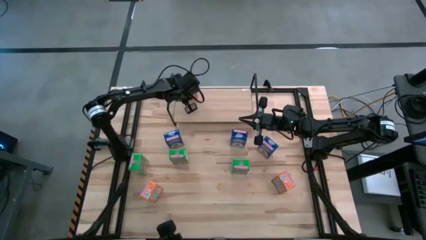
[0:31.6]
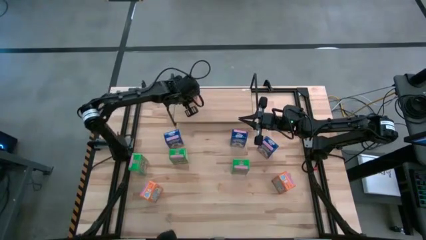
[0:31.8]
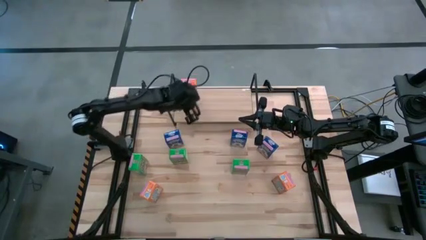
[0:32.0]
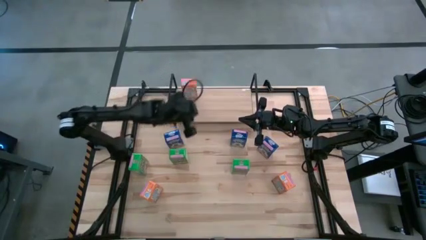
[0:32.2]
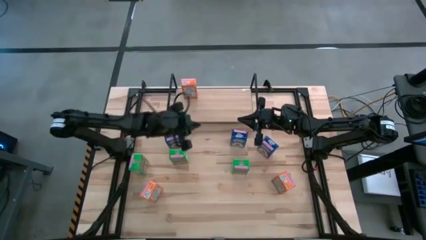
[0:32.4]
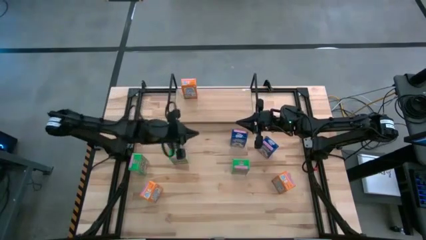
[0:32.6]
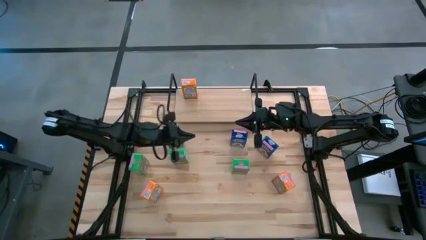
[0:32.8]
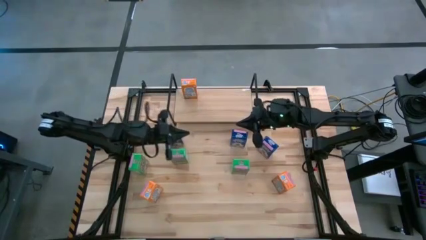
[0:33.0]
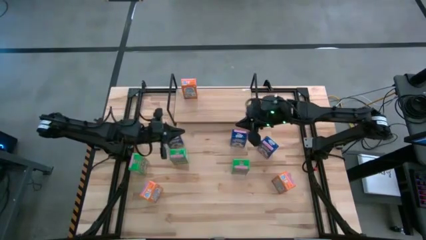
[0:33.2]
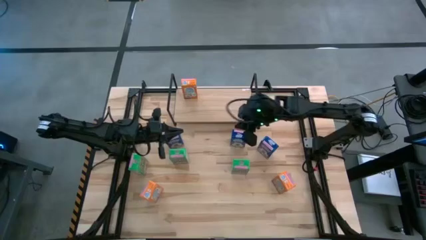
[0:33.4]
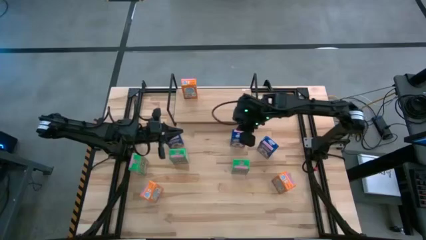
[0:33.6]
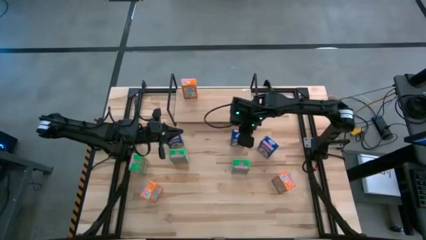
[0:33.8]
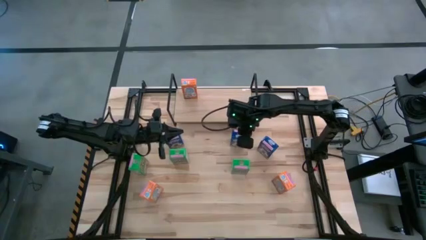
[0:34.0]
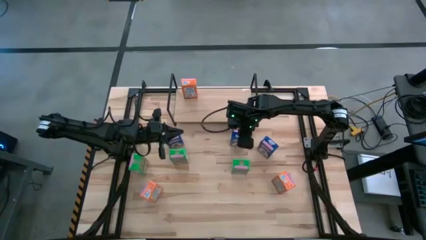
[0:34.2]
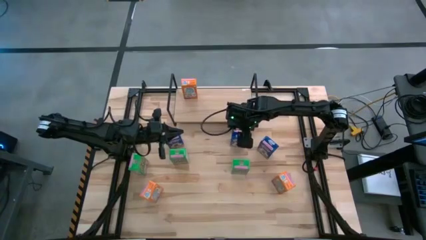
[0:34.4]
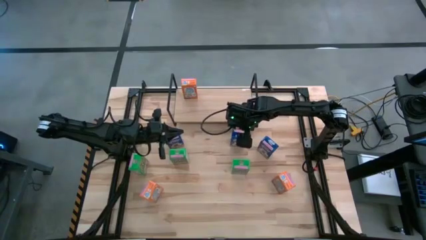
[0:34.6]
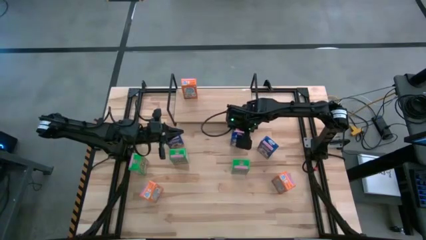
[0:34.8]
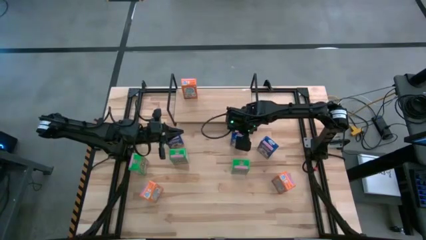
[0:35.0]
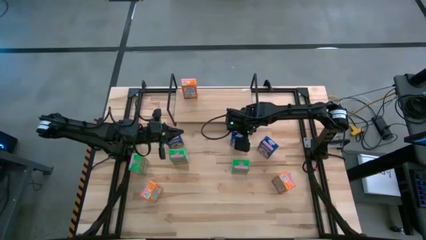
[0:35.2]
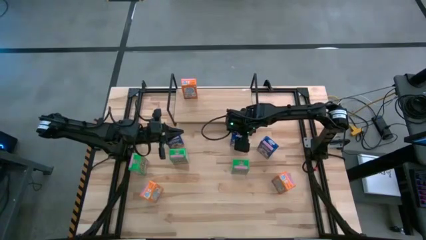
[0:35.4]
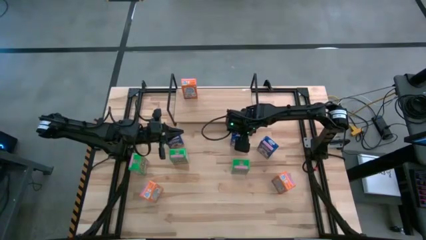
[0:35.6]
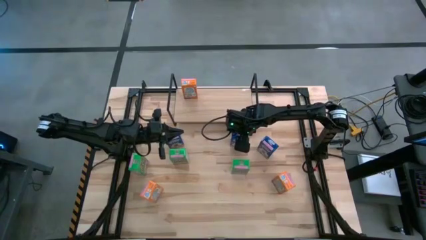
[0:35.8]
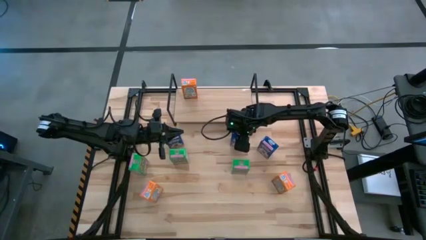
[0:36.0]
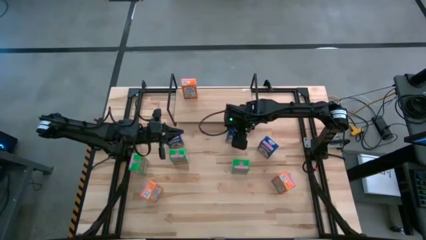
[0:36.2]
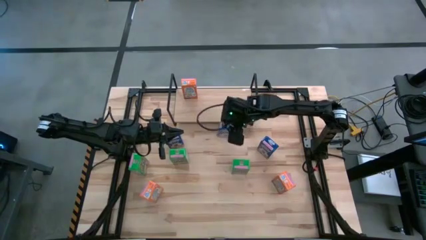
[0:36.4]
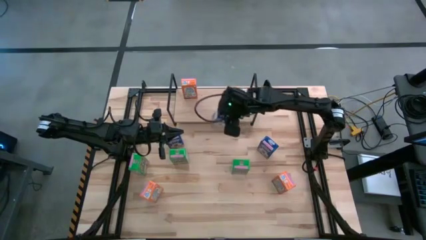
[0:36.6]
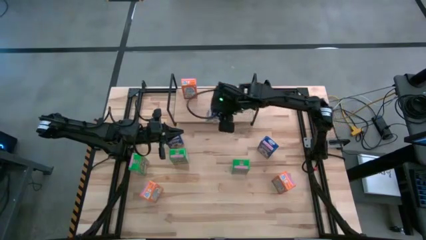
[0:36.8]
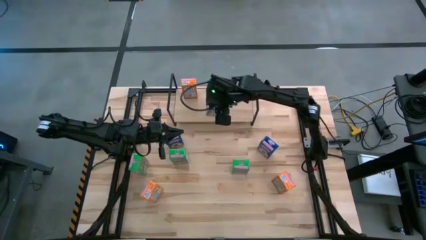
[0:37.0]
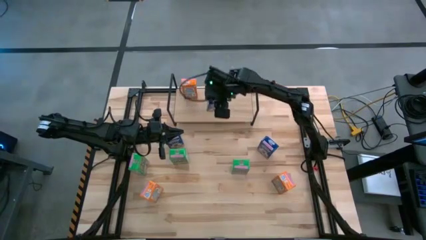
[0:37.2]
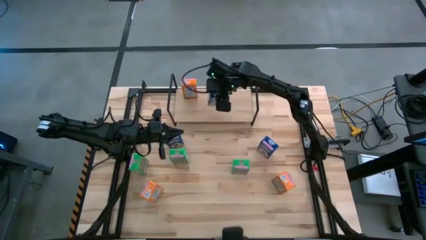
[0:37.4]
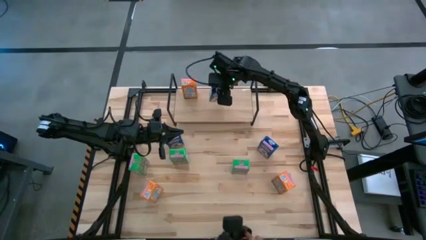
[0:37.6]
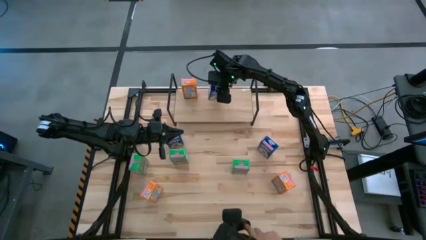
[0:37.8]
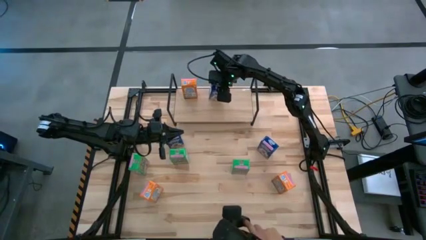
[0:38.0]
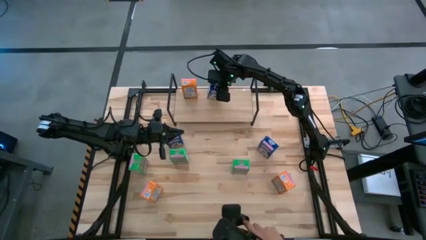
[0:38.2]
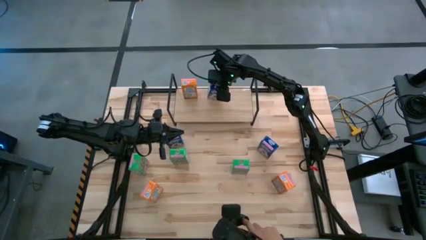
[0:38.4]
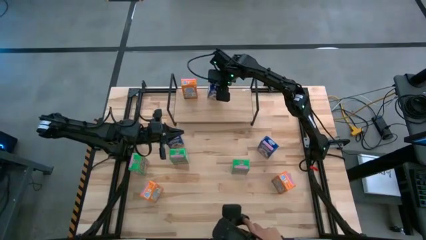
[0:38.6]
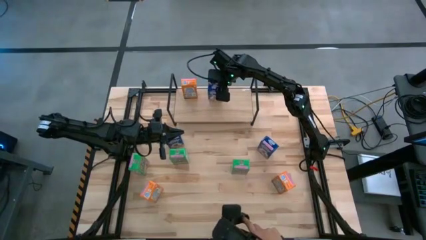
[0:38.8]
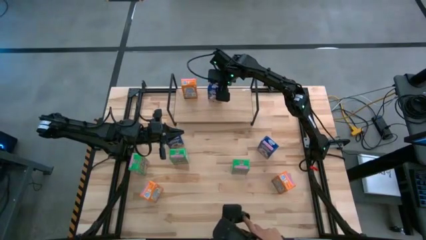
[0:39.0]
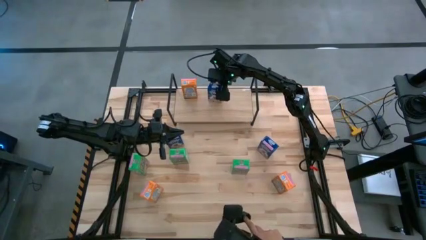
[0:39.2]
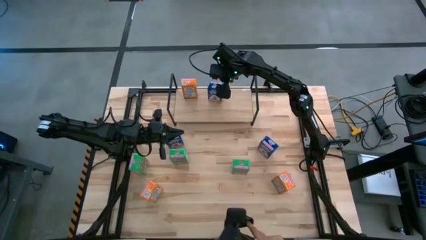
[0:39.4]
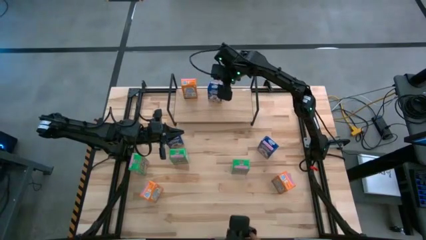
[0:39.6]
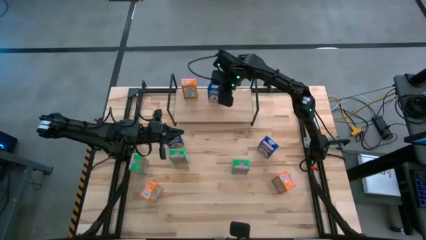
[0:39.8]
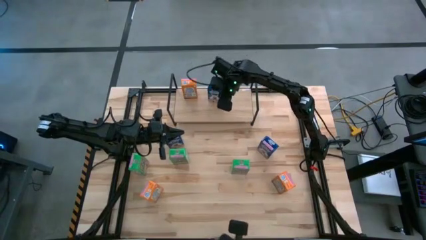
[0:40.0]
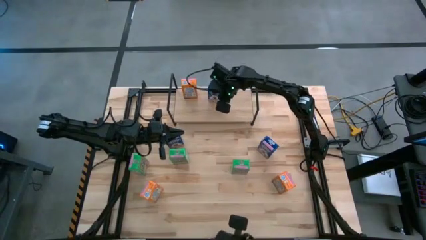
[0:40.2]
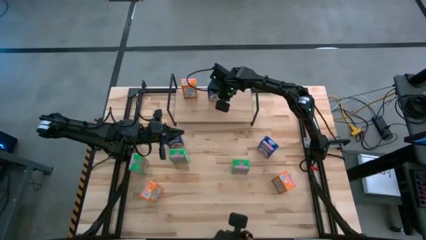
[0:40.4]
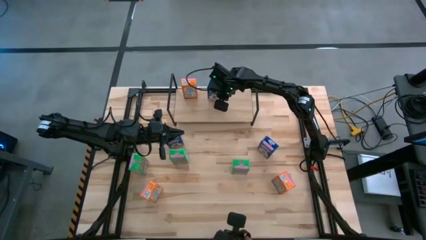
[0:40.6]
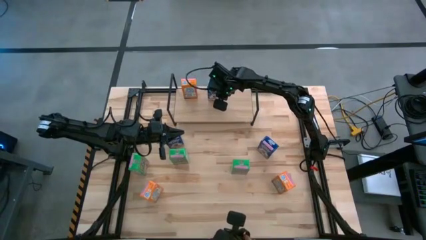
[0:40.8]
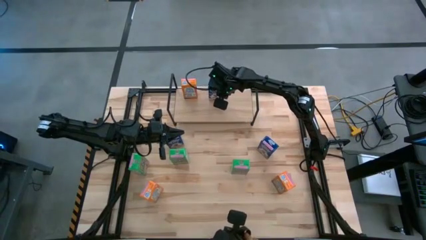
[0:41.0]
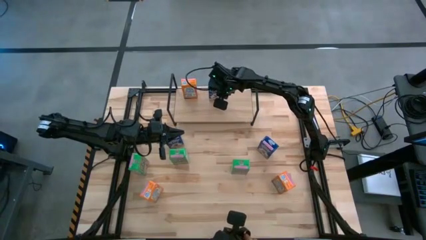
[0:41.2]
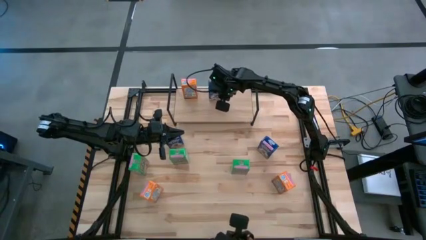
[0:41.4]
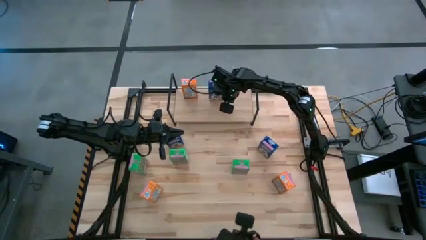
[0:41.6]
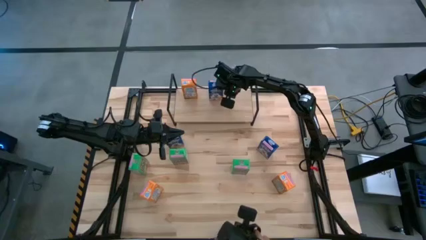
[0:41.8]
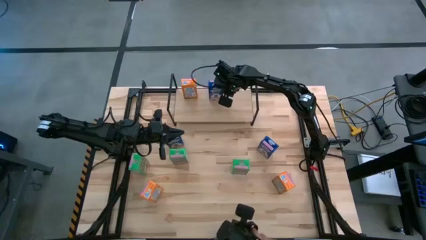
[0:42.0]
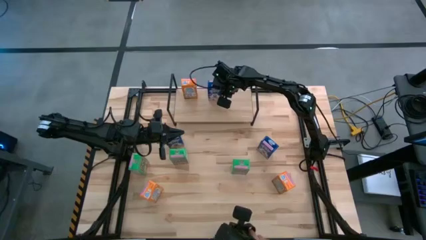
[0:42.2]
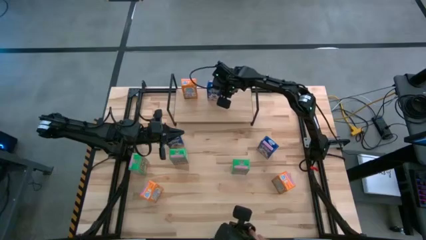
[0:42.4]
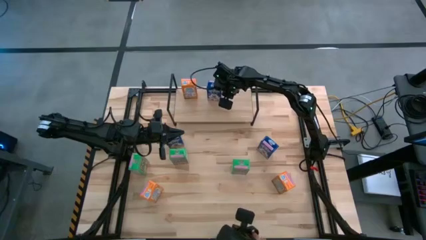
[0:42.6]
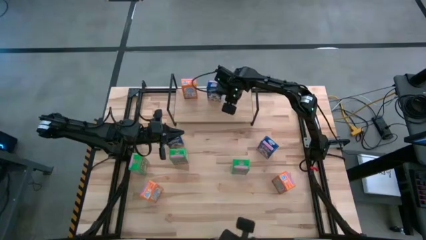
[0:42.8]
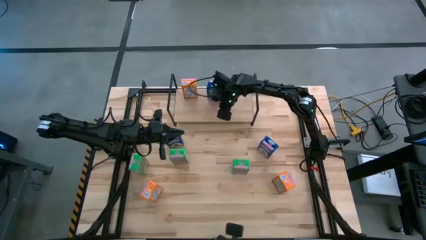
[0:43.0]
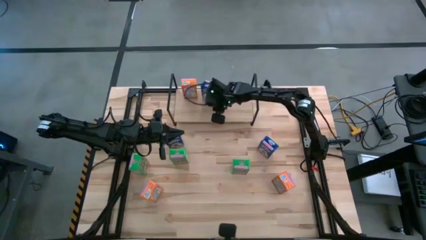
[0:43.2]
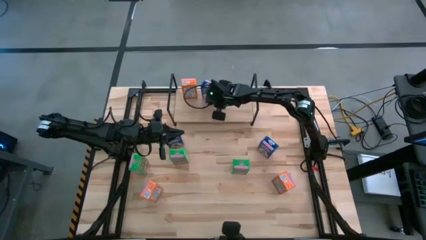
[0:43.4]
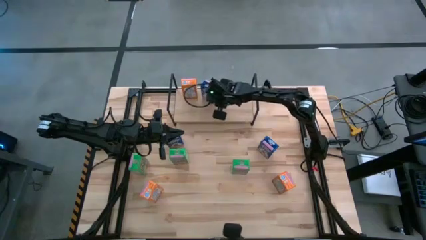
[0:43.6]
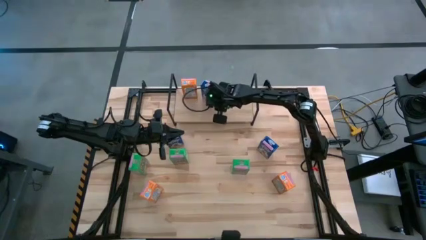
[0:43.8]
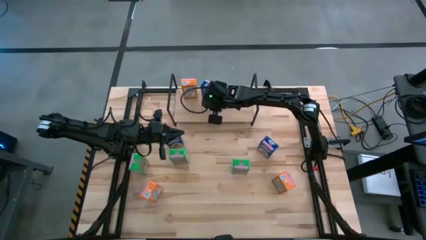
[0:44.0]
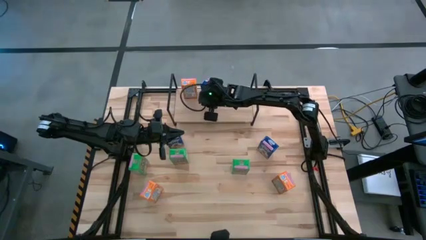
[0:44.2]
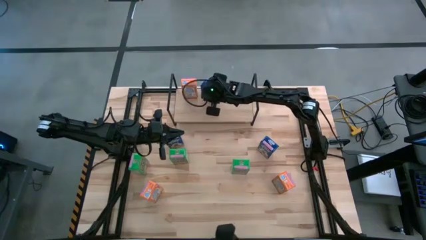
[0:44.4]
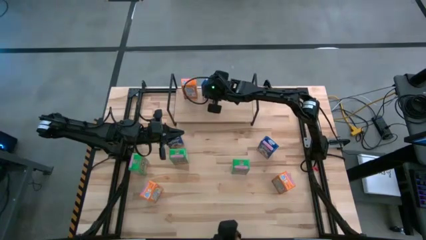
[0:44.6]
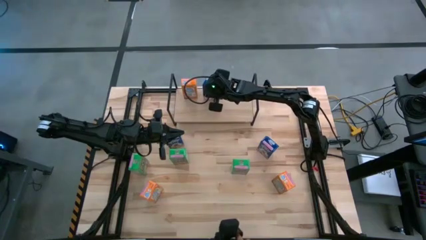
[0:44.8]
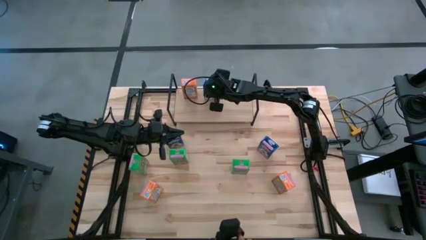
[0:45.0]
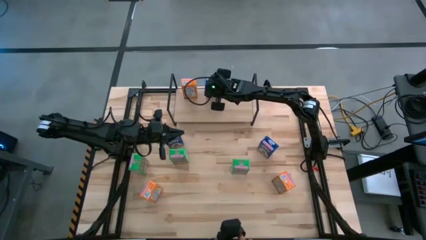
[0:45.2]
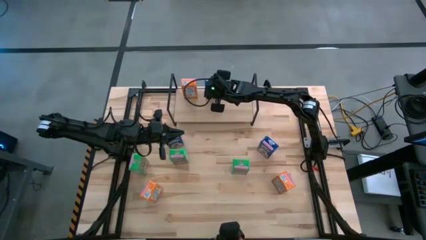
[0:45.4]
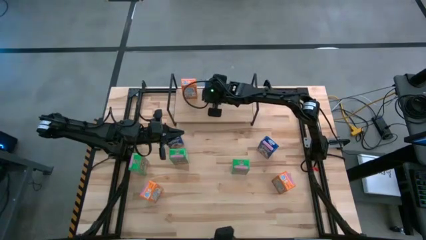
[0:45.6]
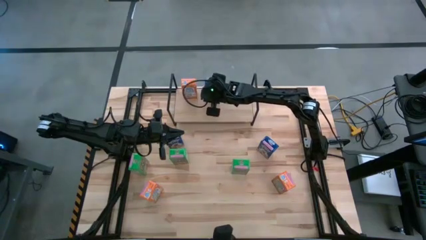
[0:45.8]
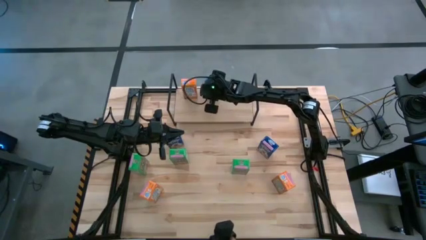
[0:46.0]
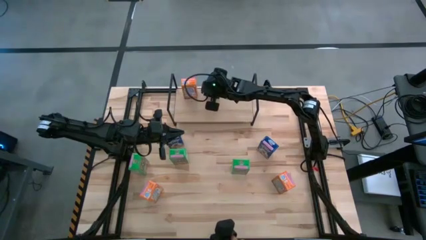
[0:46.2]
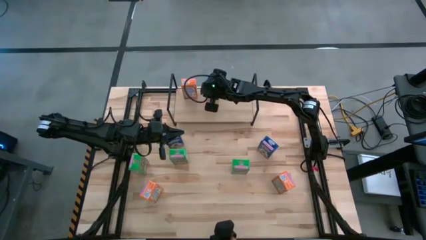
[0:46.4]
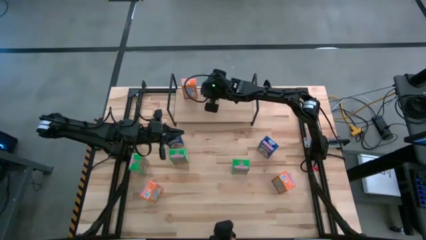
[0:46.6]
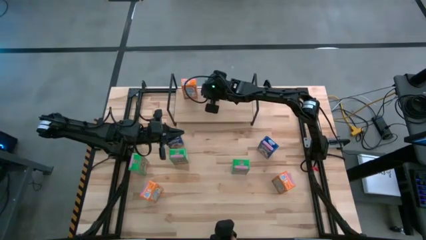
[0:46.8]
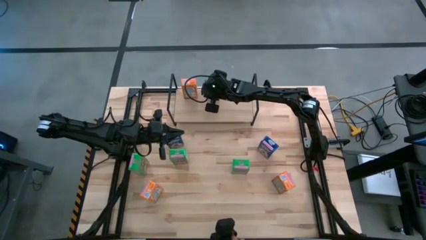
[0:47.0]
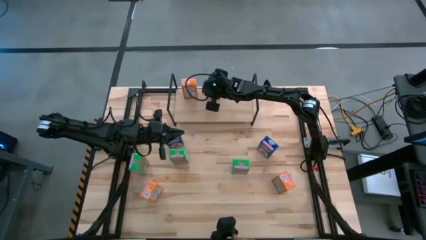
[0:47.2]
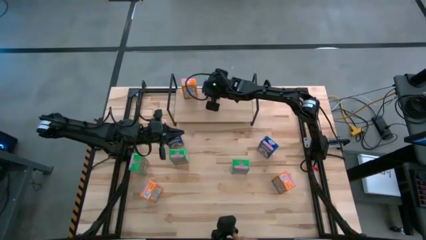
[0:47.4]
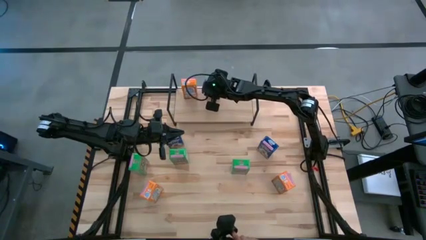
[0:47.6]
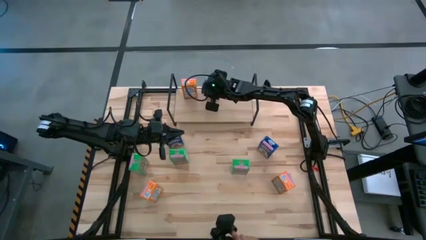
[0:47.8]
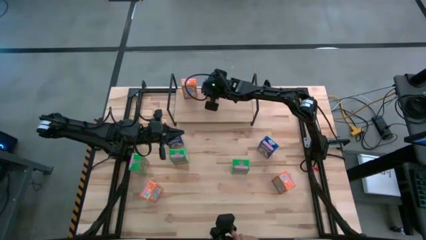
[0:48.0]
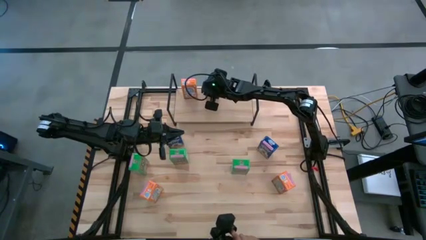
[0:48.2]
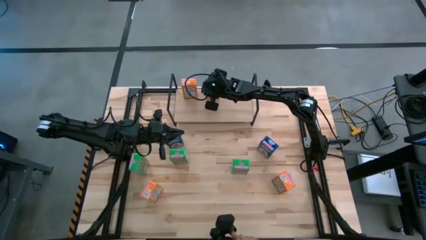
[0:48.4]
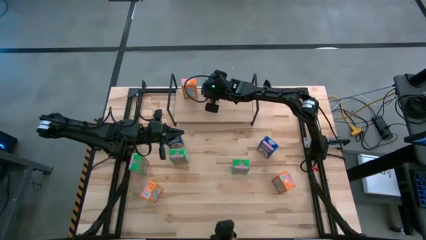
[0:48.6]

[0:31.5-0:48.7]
Task: Stack cereal on shelf
Put the center blue cereal box on the shelf
